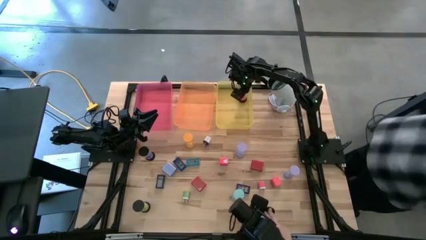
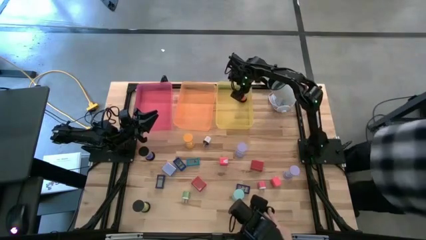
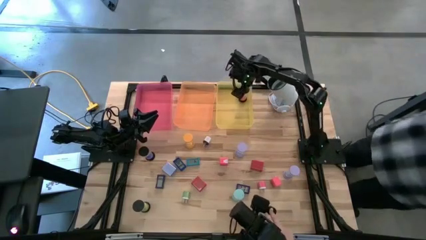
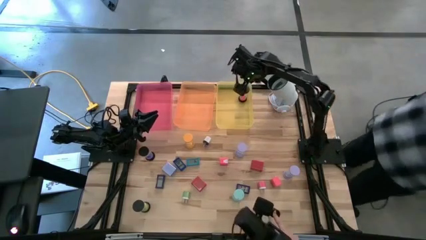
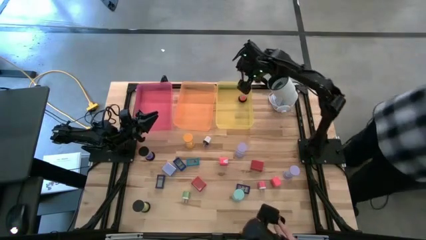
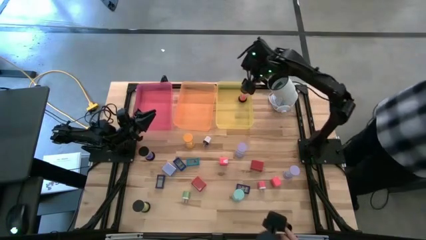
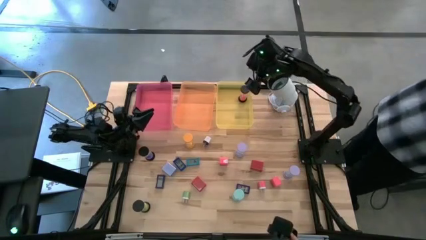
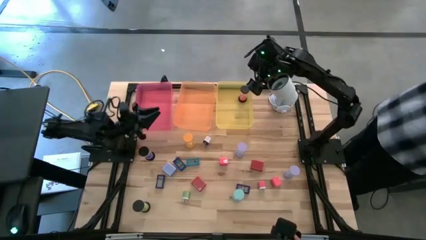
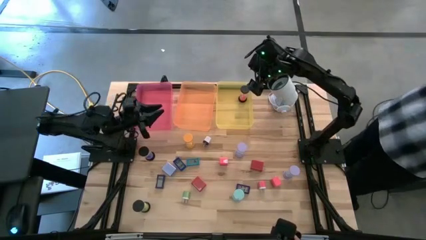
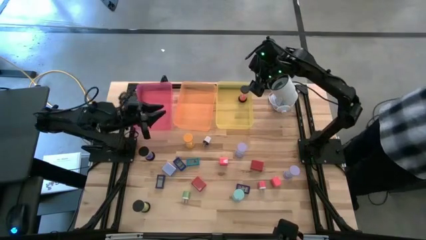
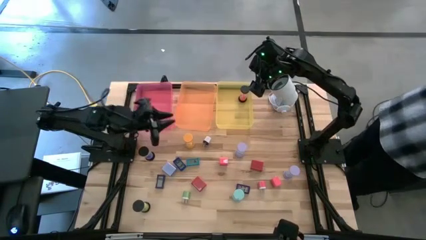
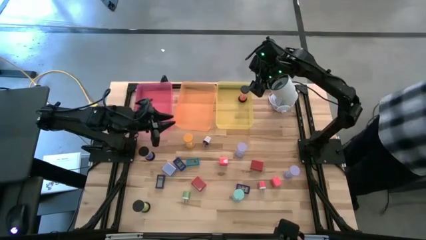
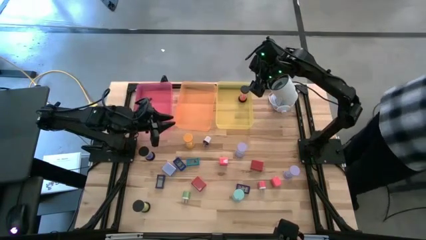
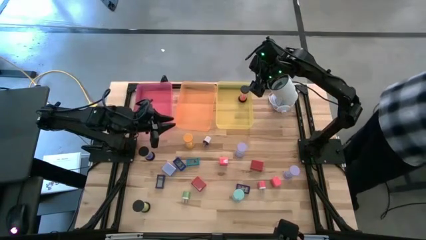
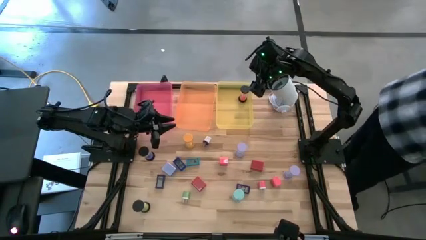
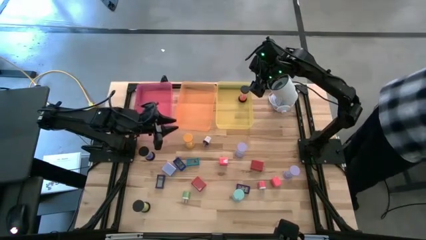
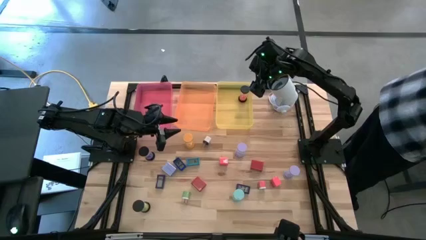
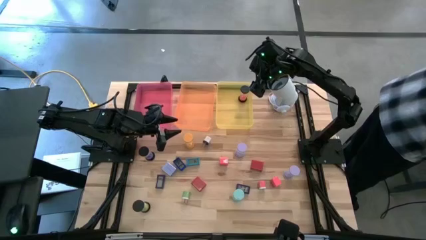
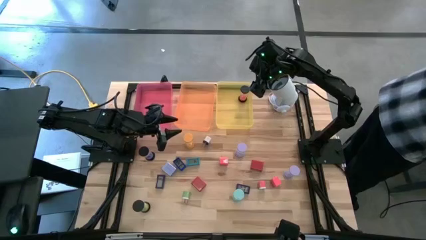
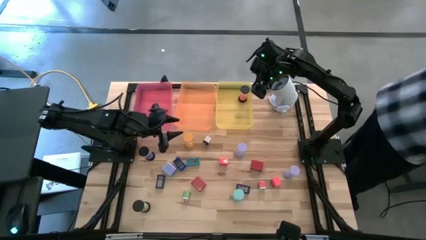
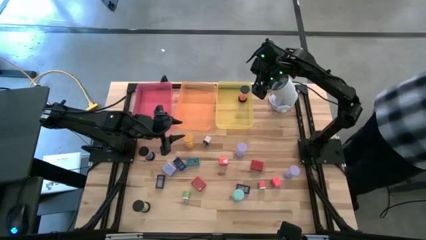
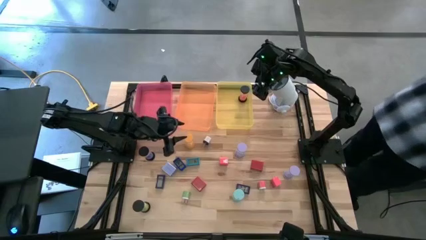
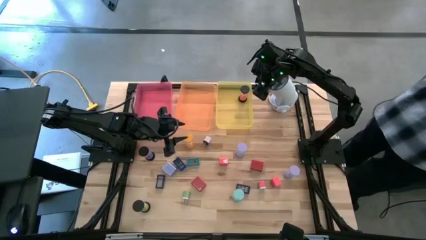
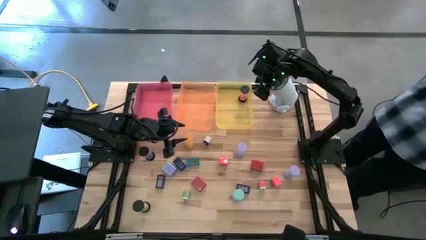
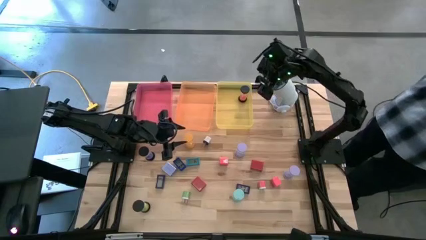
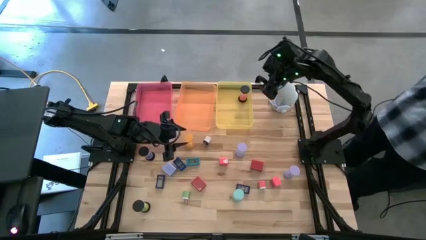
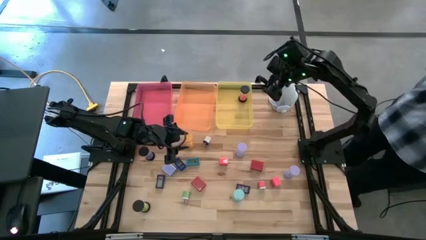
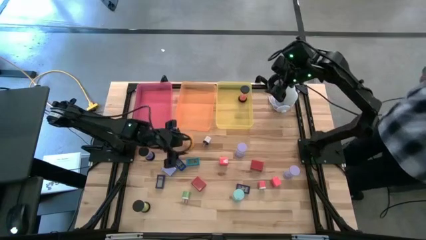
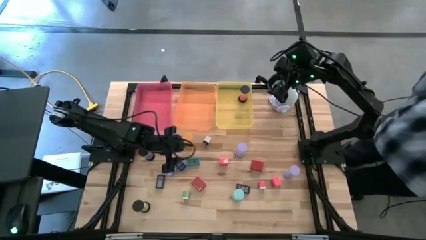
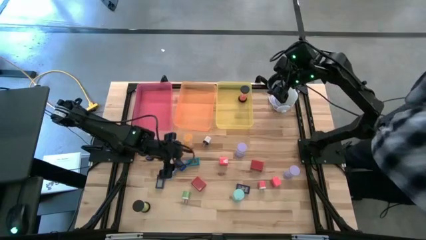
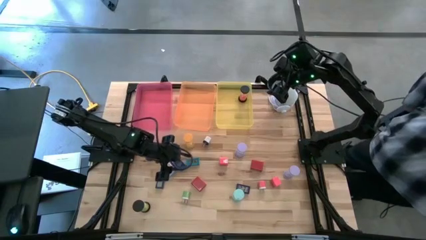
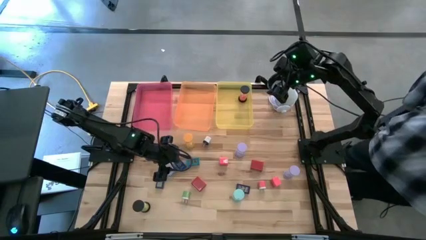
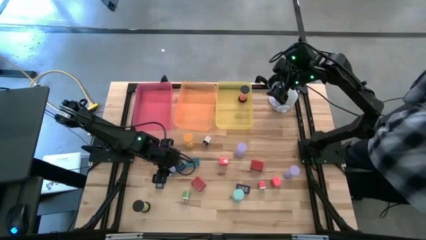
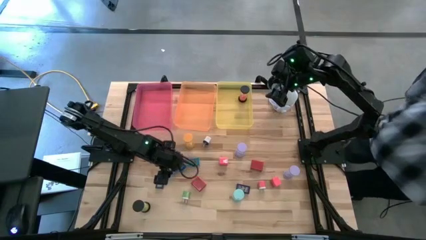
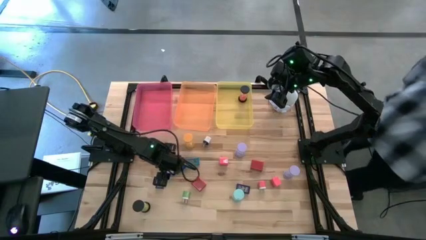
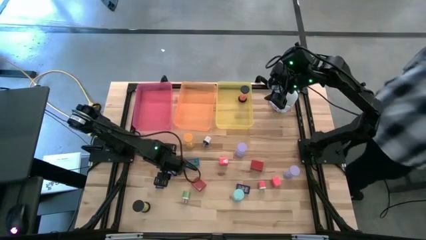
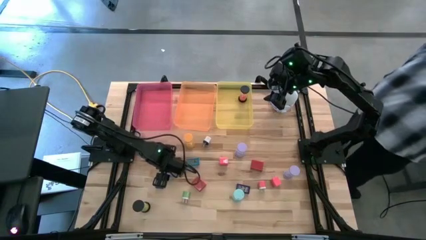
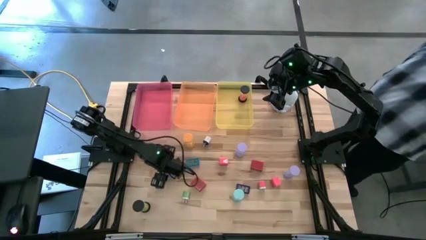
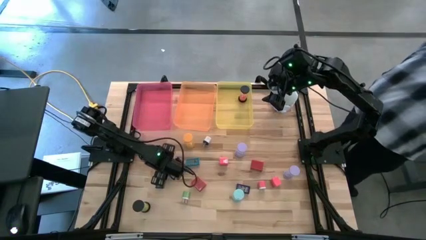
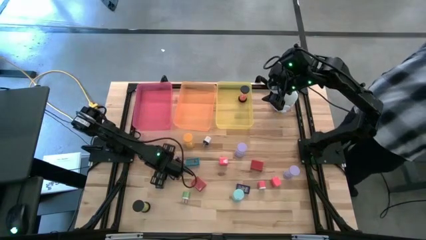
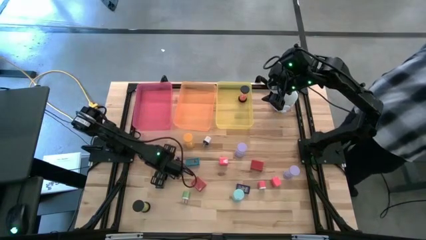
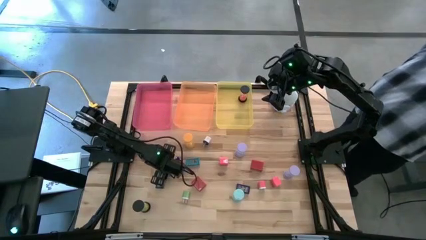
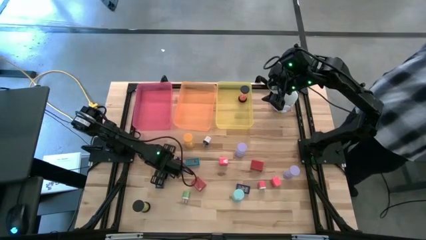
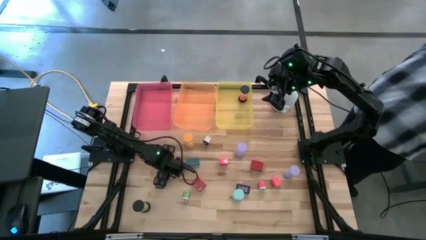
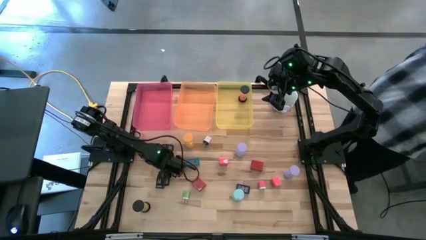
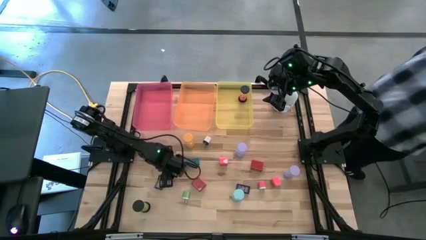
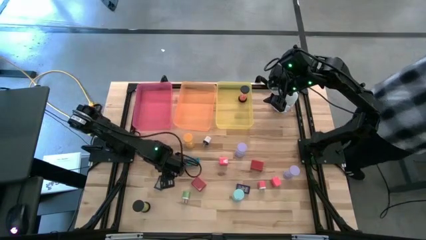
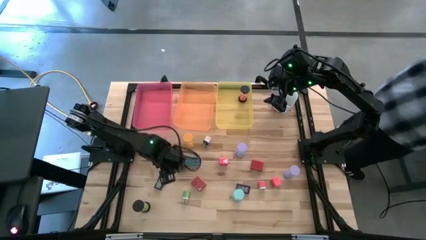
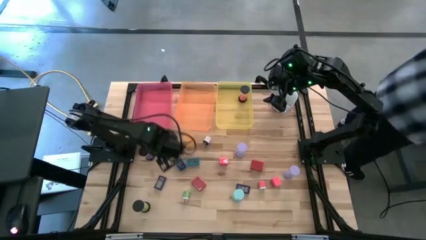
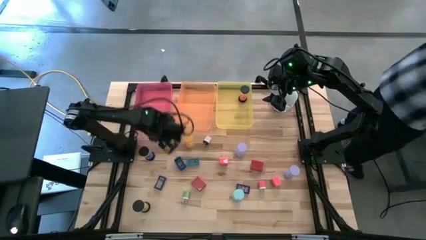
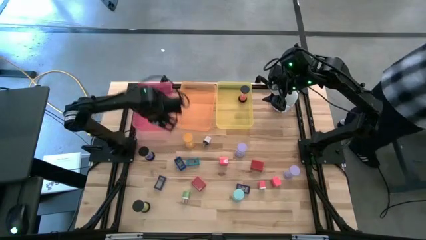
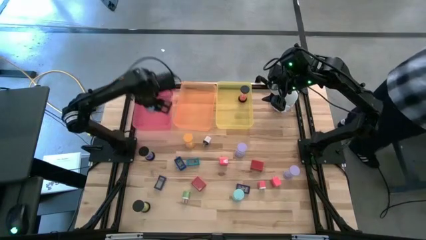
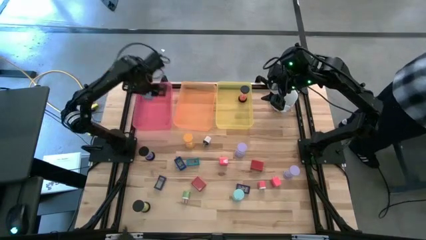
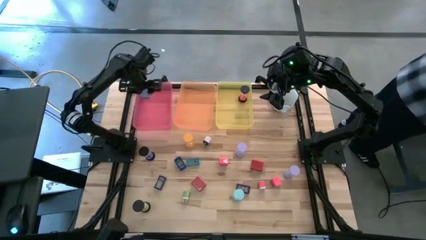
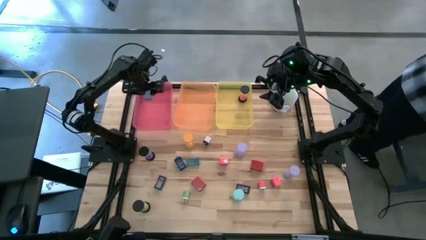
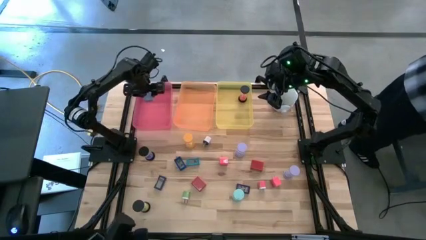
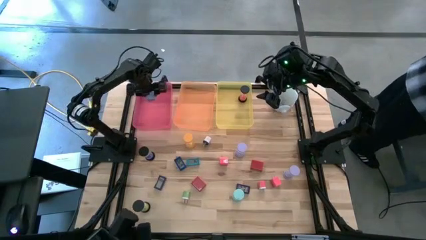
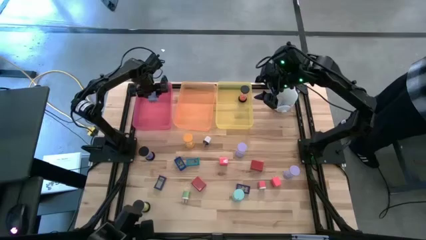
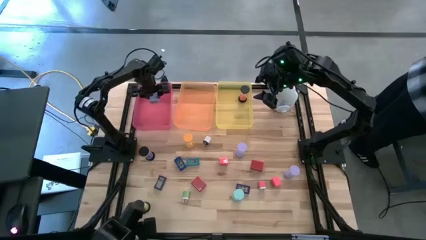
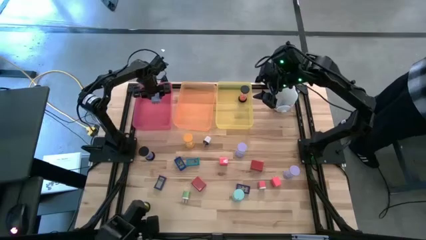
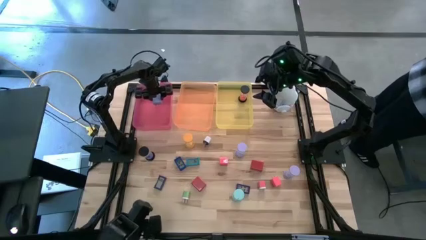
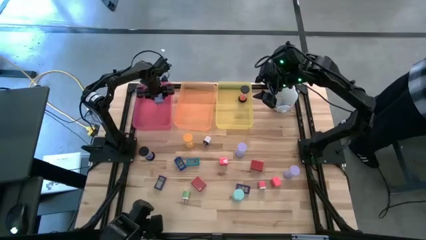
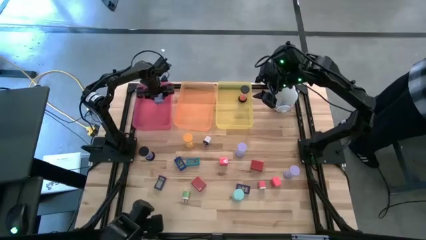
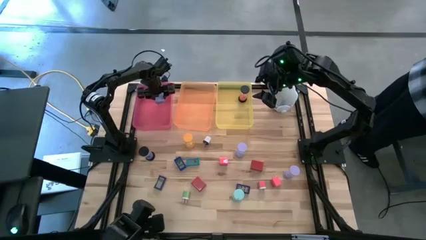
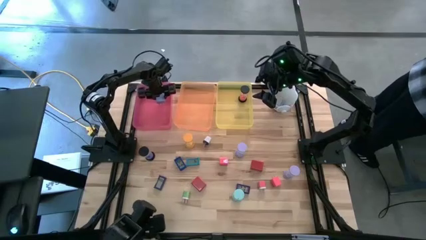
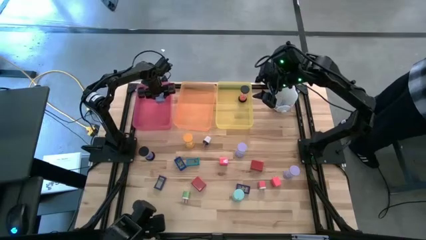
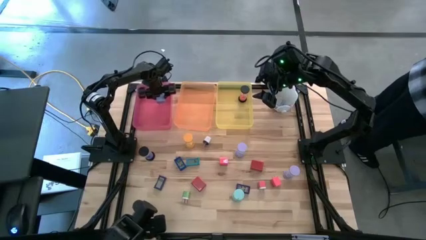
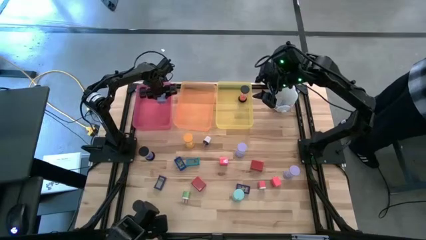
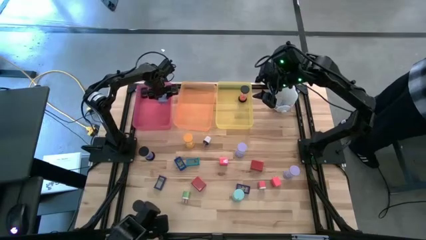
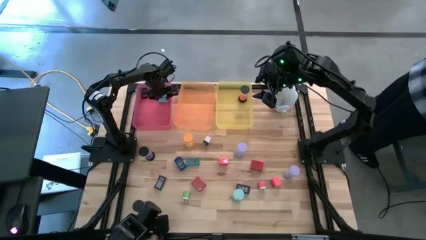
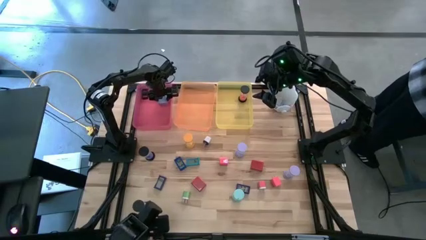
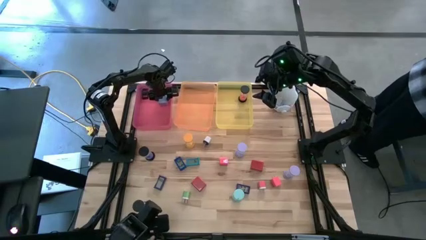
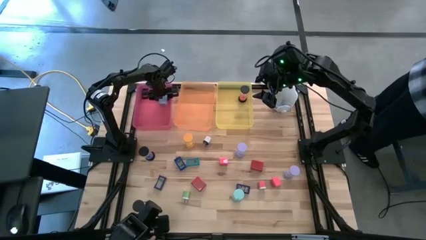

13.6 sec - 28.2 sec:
Task: Pick & Place Office items
Put the violet charger adapter into the red bin
